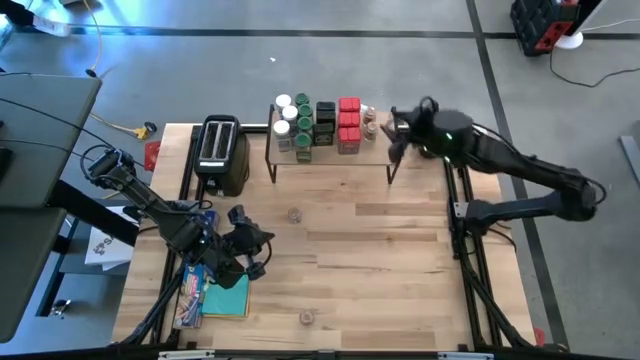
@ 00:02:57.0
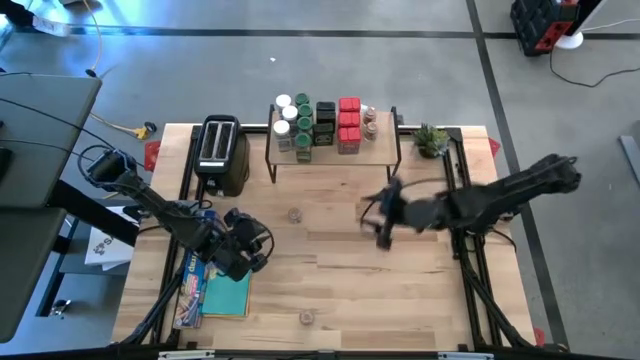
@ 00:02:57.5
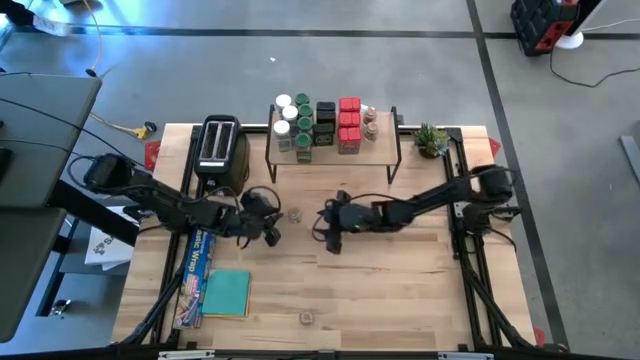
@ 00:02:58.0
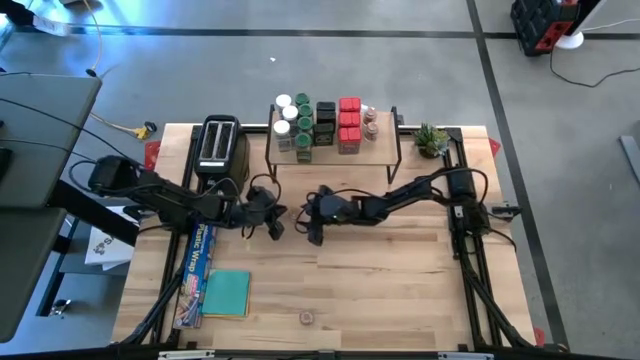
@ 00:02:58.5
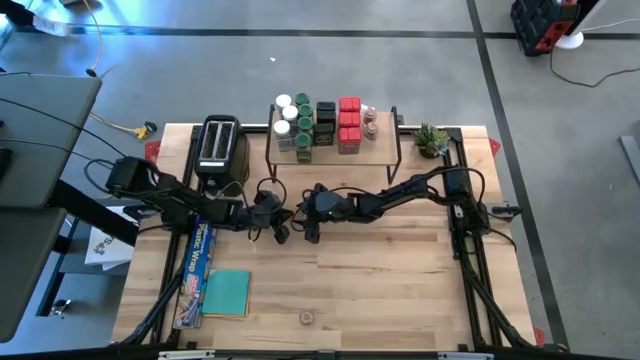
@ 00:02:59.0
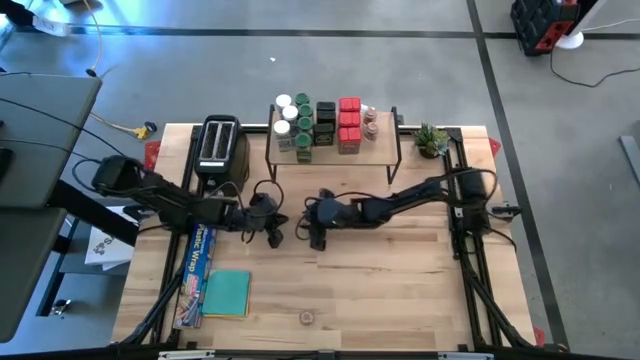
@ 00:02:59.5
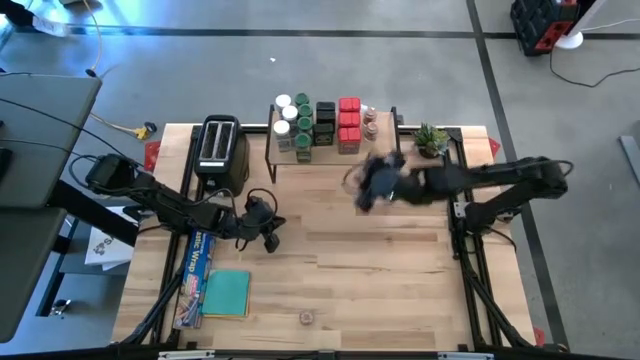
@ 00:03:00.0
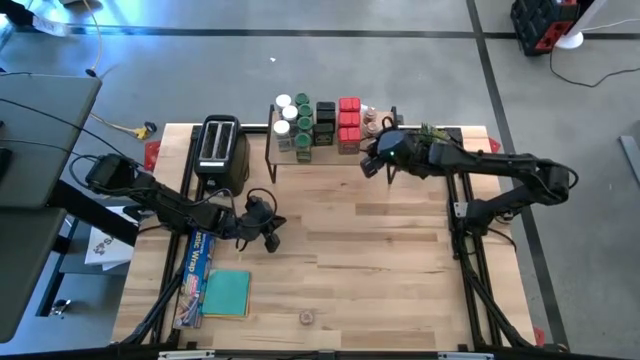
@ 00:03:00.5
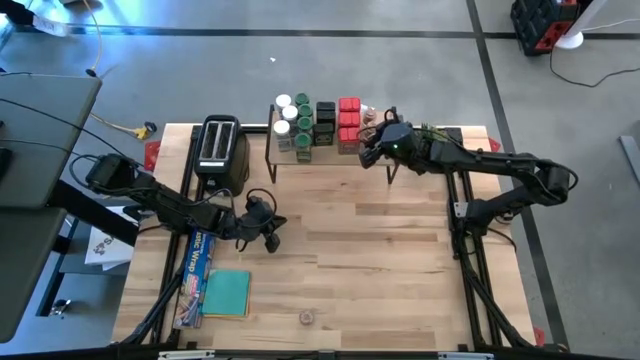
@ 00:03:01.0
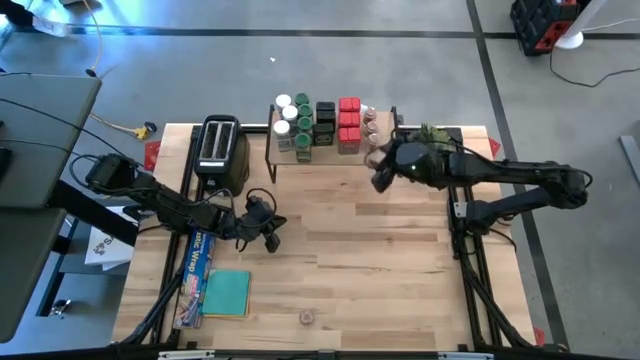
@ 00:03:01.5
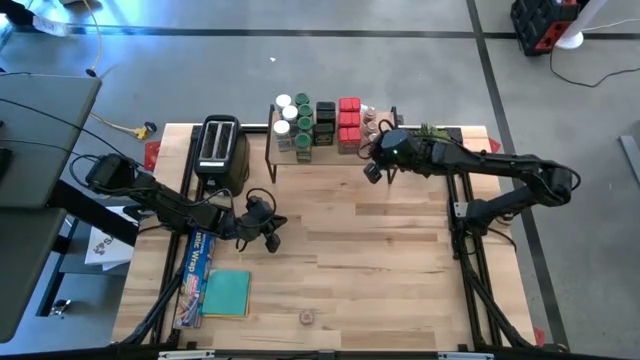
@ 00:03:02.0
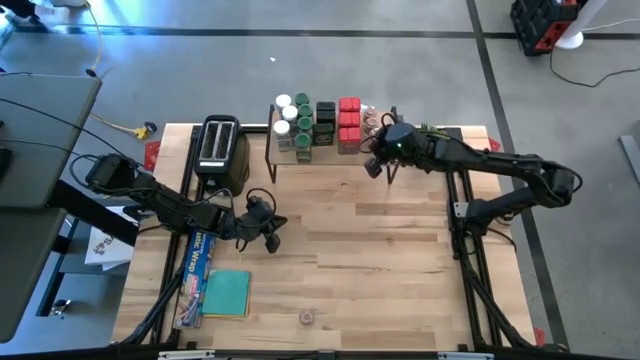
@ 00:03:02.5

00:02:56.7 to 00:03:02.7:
Task: Shelf spices
Put the top transparent seasoning bottle on the shelf aligned with the other transparent seasoning bottle

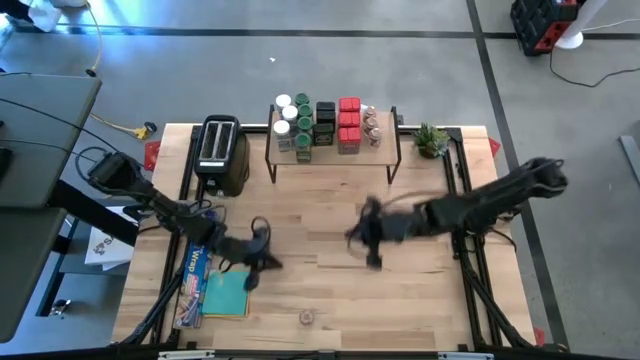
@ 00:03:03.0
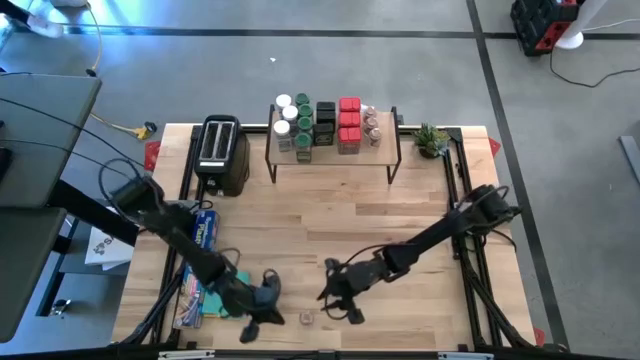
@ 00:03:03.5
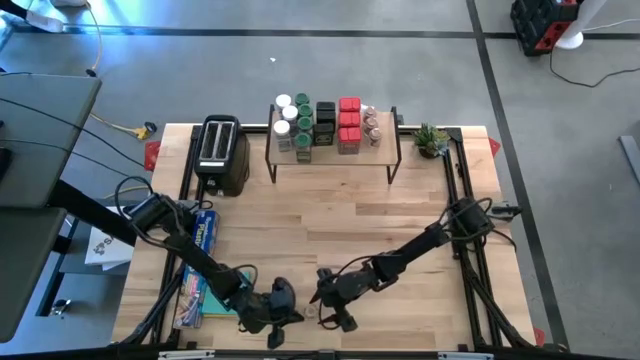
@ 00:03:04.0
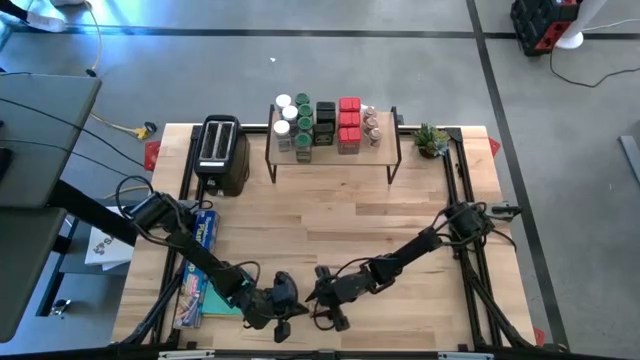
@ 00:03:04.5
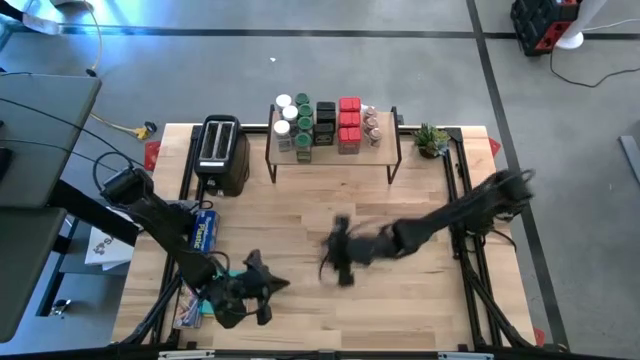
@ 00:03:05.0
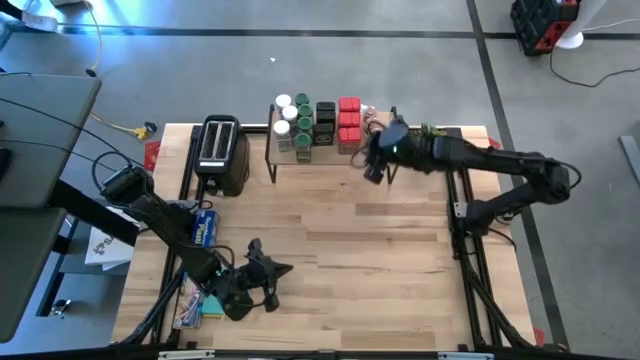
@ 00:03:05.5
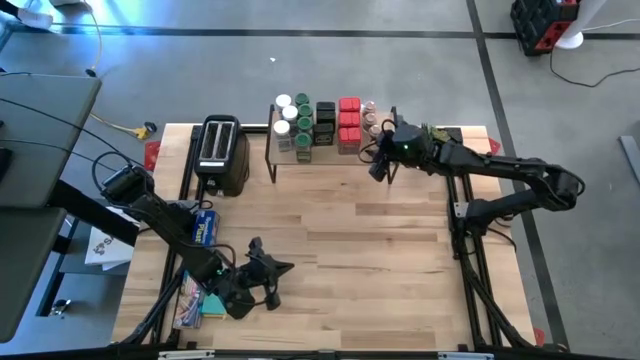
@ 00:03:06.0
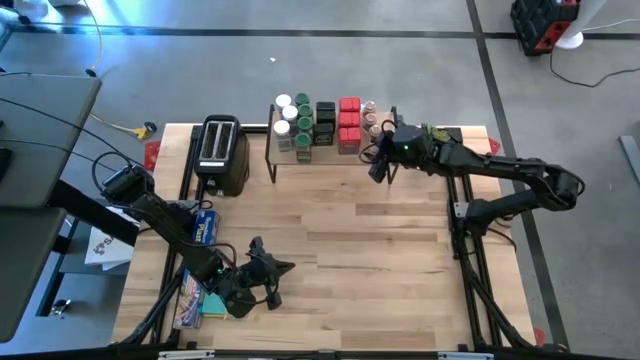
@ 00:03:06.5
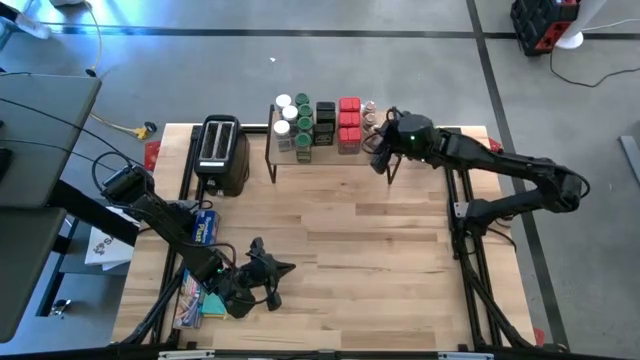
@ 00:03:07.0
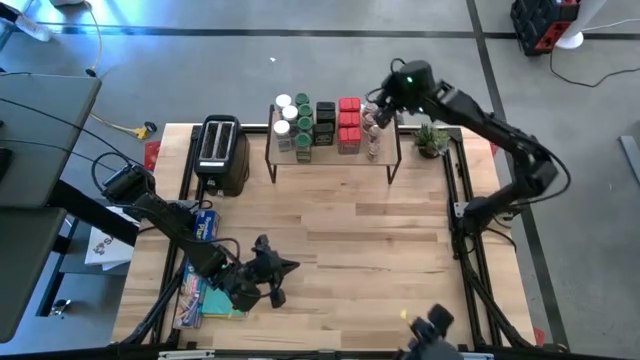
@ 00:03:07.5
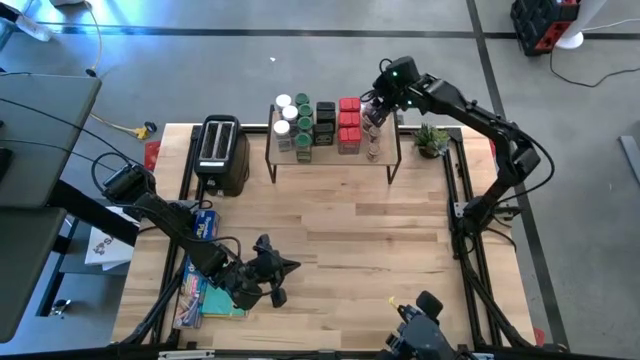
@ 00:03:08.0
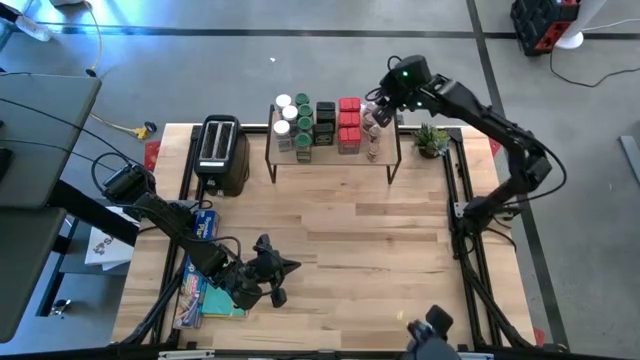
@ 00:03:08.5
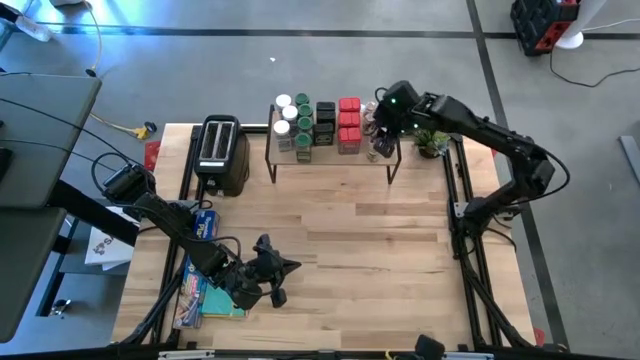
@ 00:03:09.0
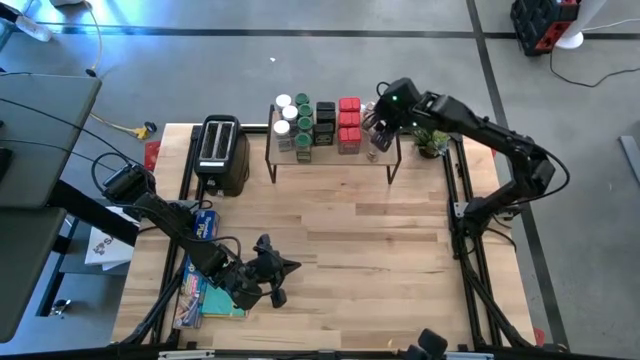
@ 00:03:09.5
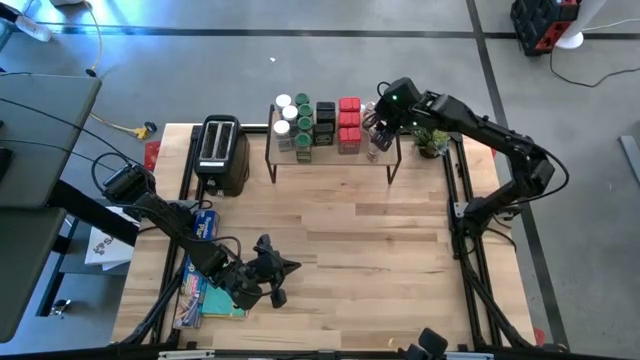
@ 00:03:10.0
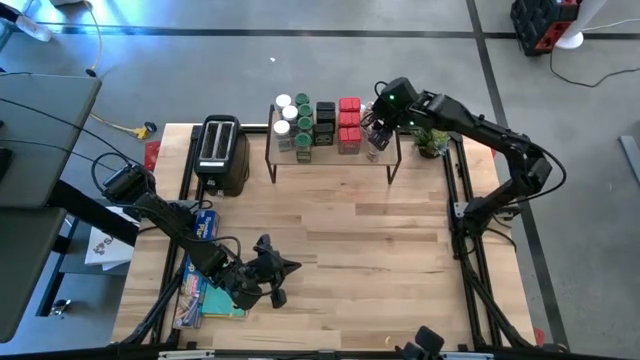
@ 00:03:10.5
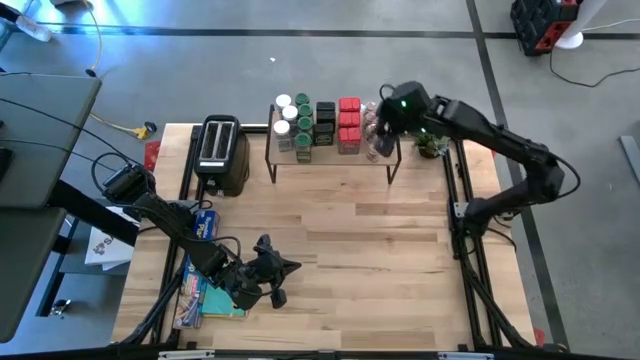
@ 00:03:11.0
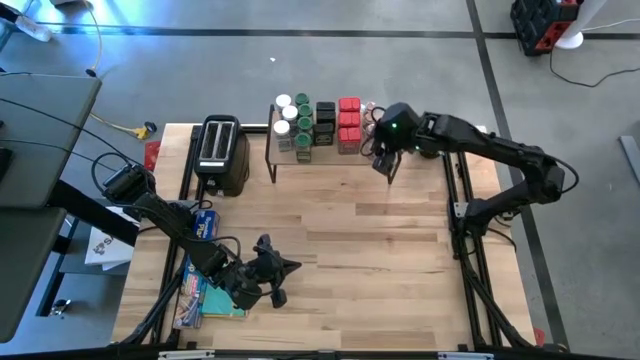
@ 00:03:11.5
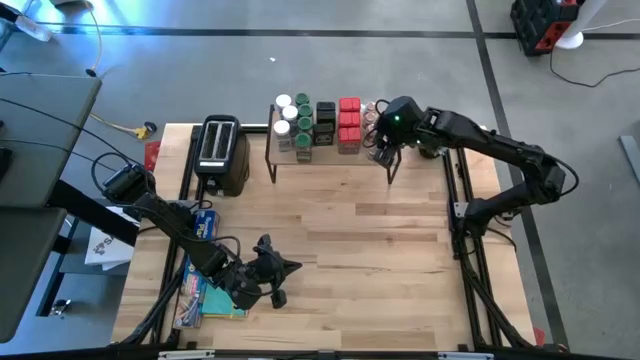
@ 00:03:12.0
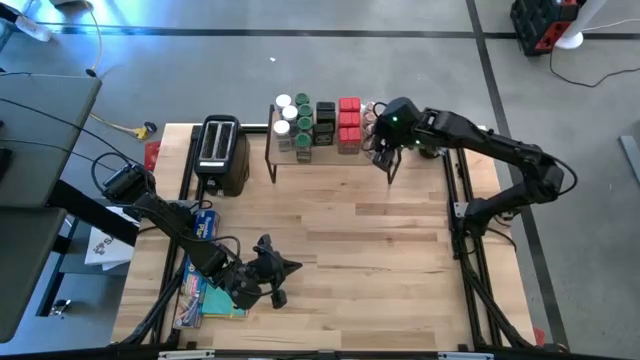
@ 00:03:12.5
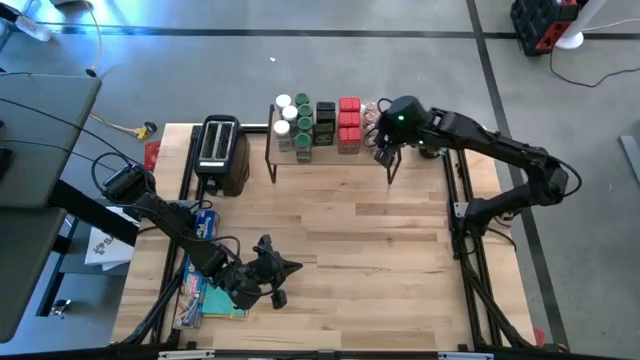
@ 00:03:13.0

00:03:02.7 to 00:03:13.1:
Put the transparent seasoning bottle on the shelf aligned with the other transparent seasoning bottle

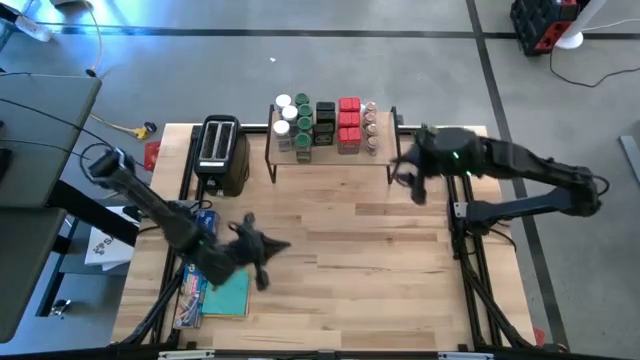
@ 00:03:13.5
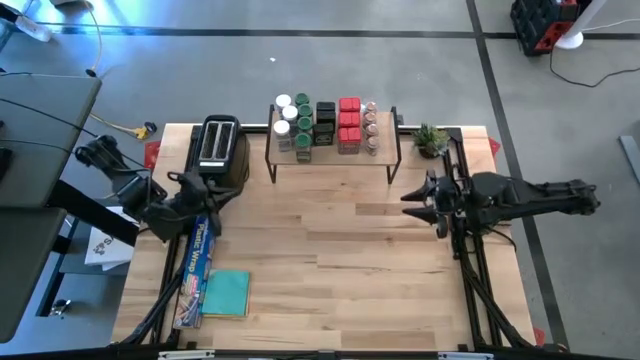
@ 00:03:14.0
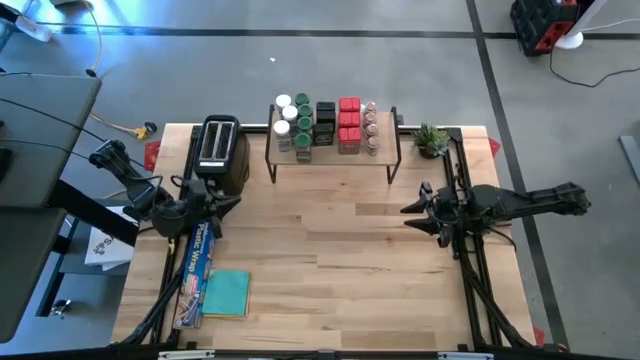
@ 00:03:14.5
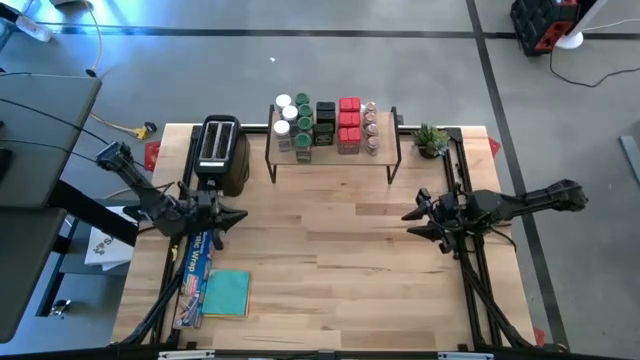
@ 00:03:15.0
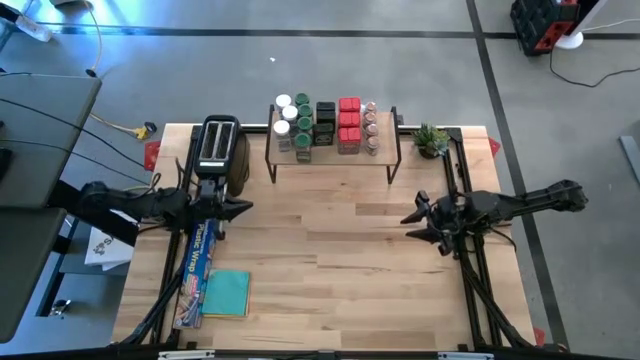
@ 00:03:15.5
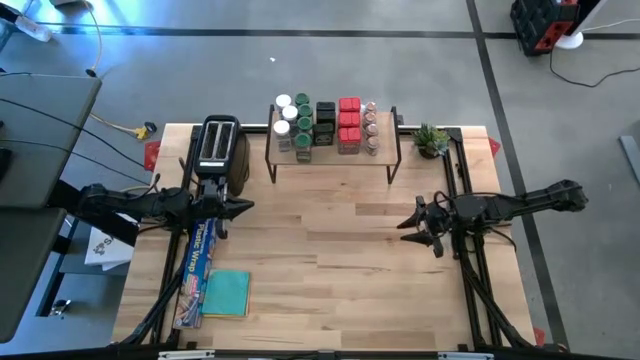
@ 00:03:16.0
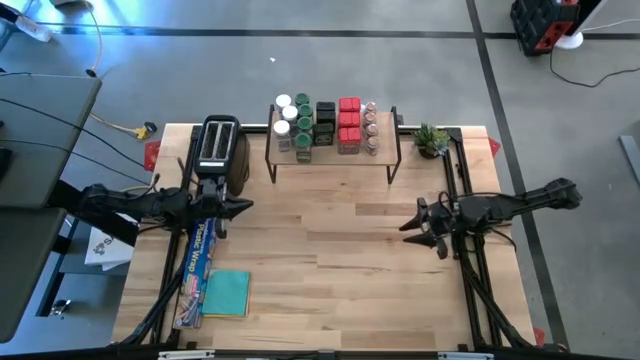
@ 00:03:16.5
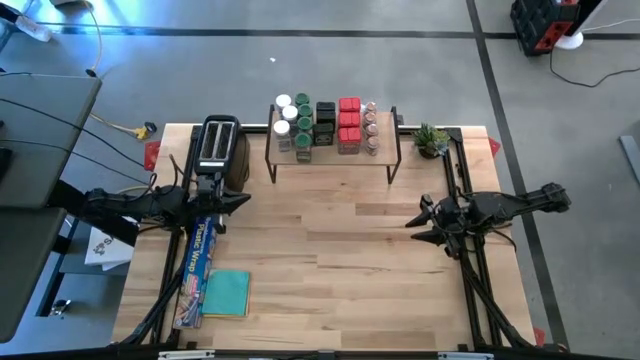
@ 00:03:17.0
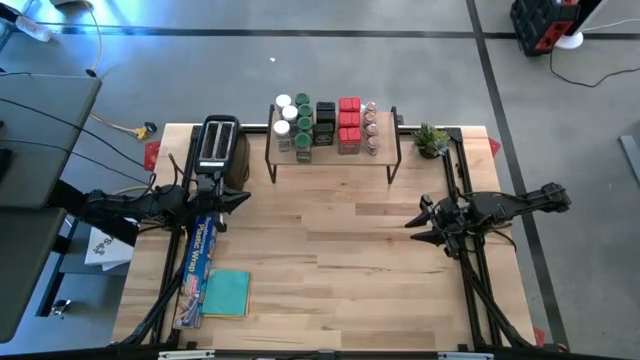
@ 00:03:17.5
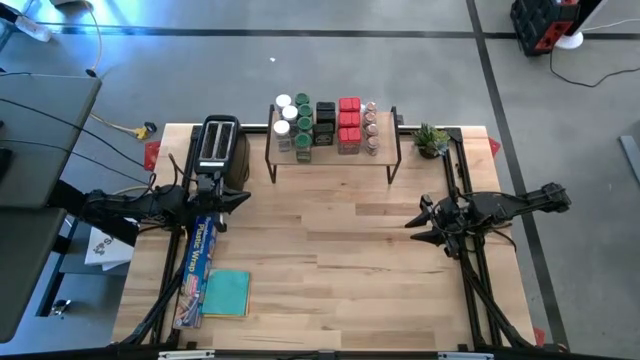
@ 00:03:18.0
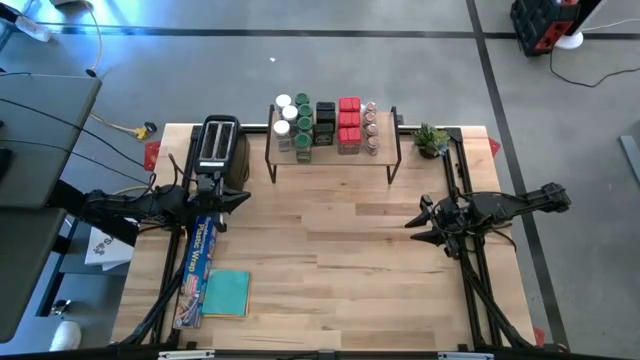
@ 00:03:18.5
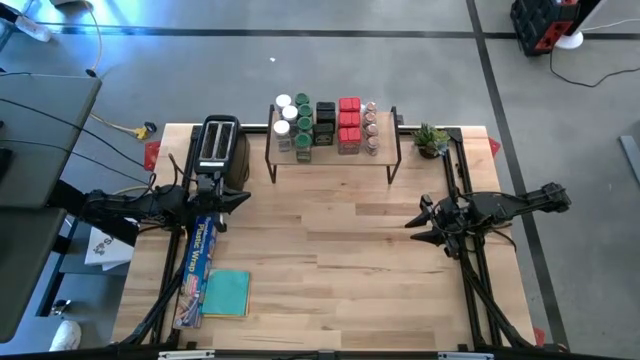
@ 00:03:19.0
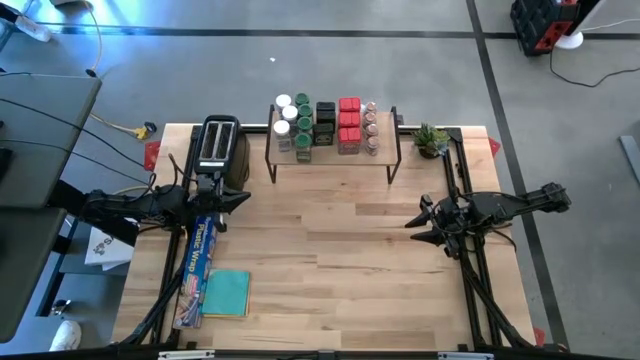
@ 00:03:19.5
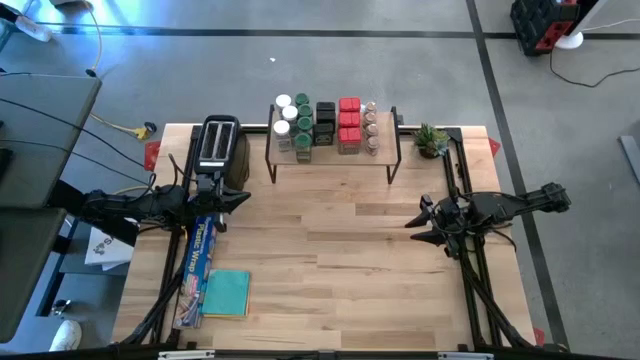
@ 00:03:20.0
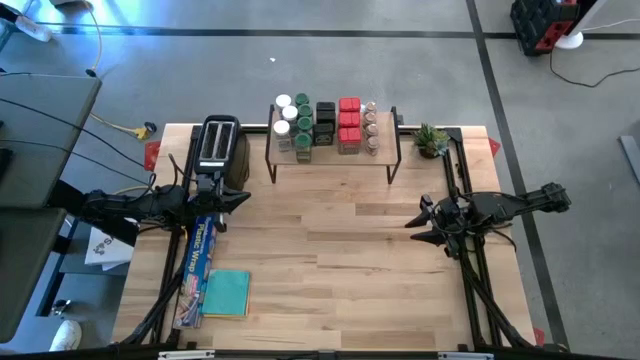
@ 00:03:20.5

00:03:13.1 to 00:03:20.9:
Return to Home Position
